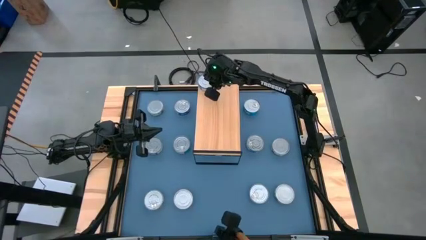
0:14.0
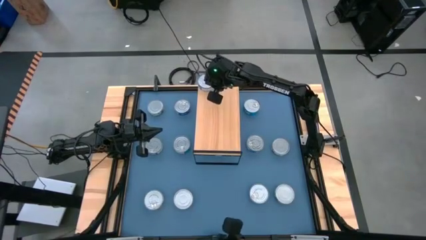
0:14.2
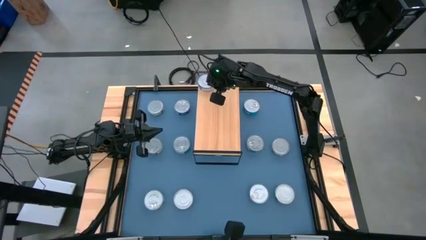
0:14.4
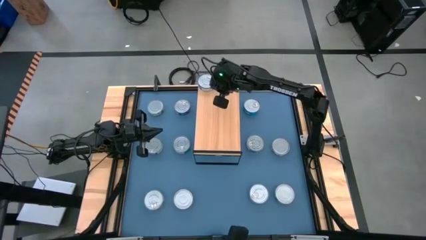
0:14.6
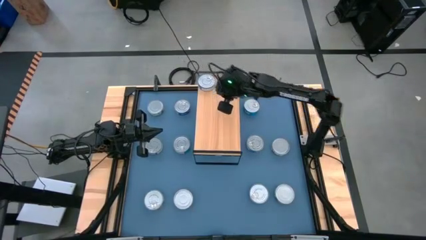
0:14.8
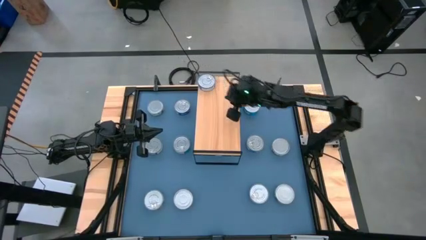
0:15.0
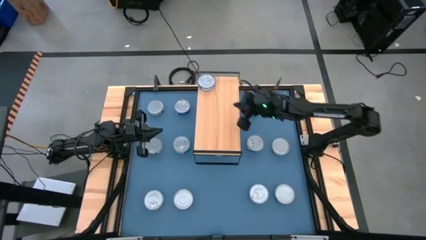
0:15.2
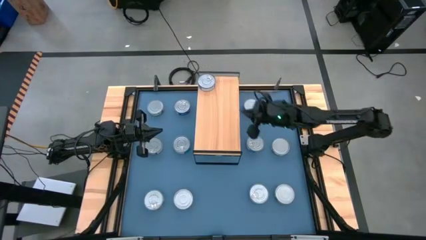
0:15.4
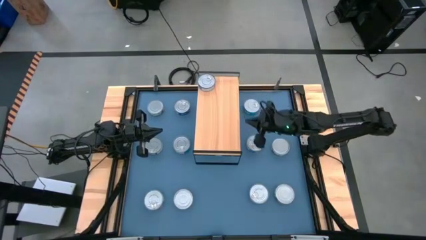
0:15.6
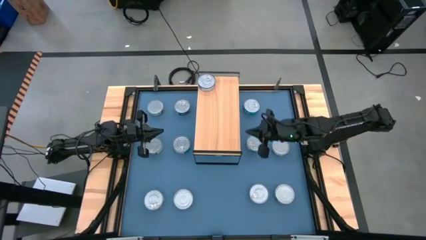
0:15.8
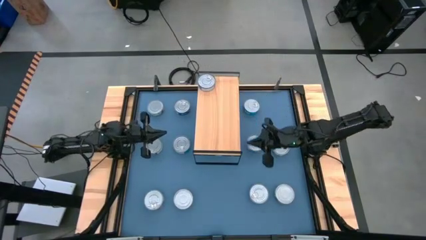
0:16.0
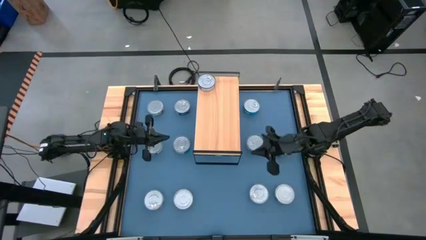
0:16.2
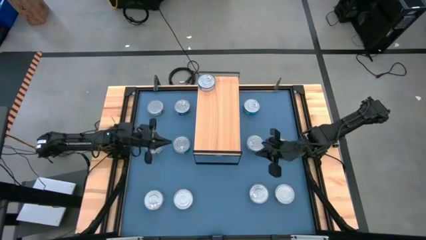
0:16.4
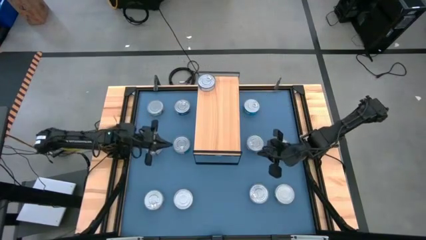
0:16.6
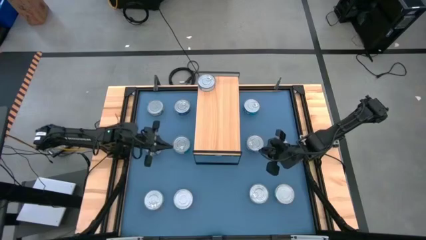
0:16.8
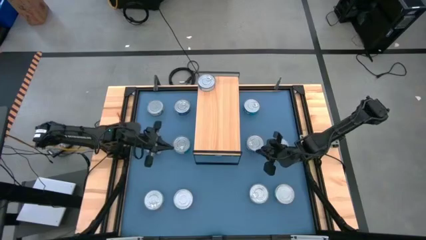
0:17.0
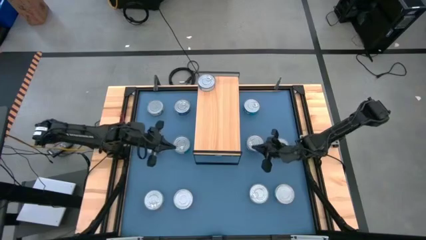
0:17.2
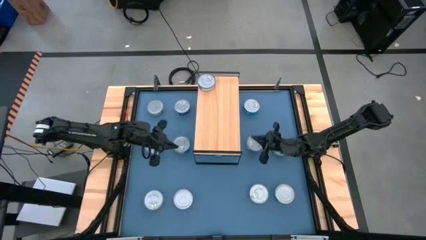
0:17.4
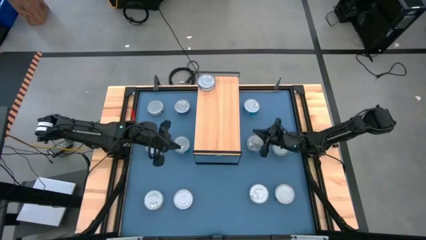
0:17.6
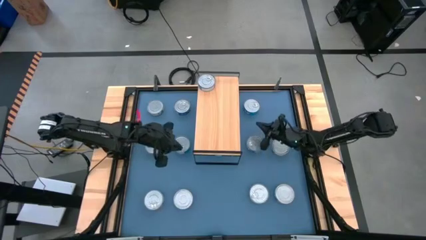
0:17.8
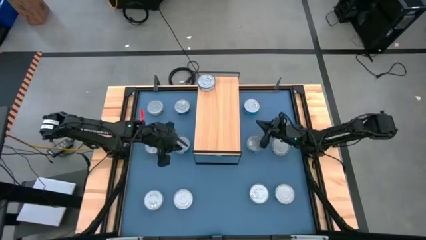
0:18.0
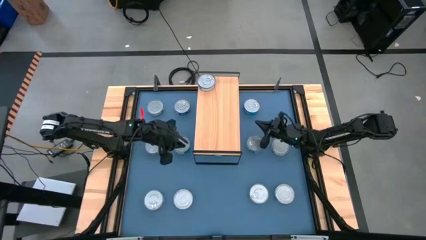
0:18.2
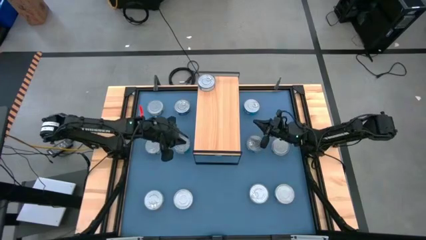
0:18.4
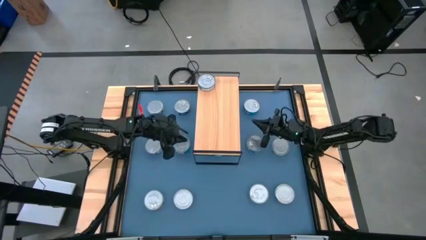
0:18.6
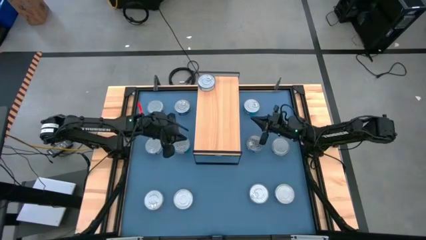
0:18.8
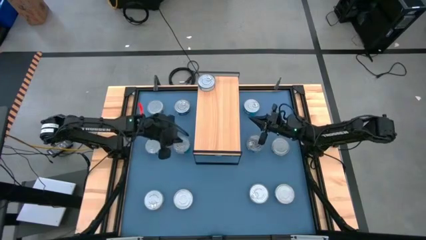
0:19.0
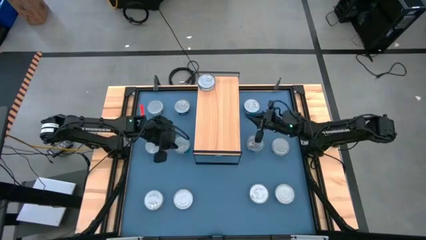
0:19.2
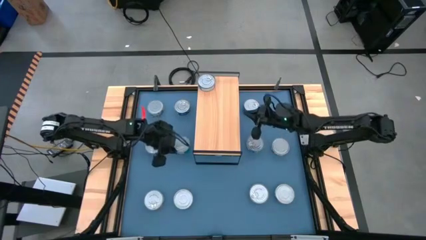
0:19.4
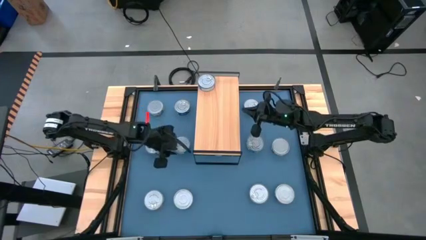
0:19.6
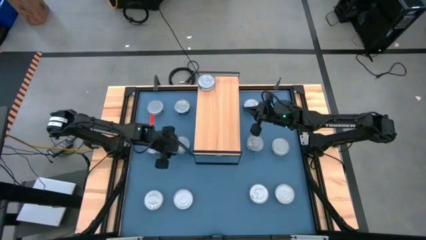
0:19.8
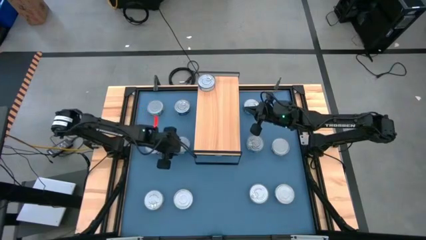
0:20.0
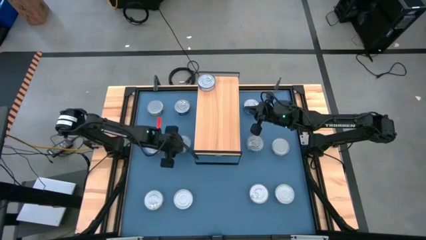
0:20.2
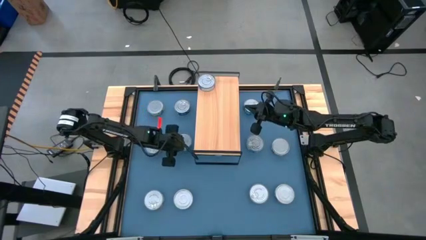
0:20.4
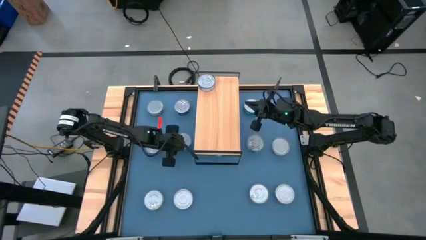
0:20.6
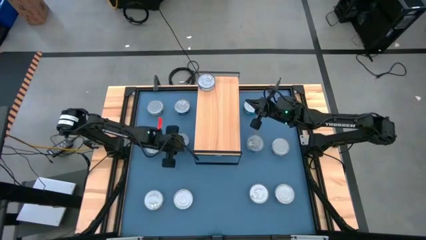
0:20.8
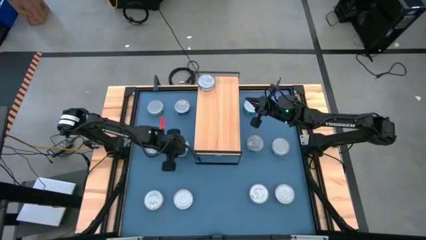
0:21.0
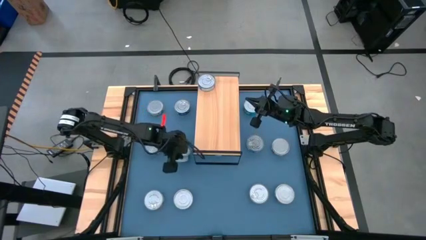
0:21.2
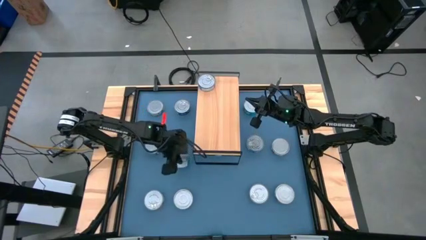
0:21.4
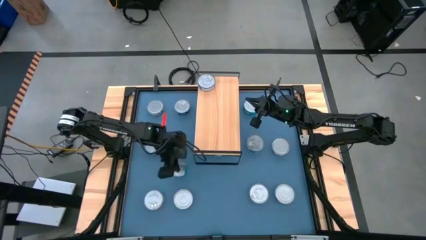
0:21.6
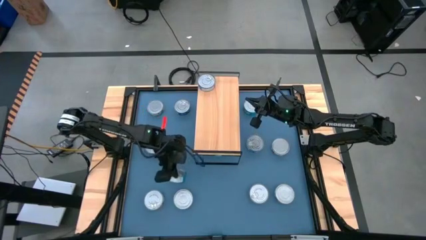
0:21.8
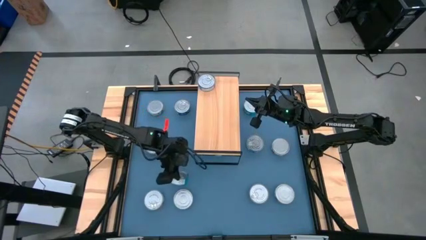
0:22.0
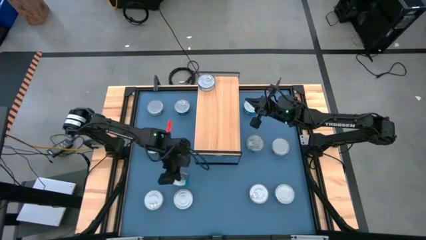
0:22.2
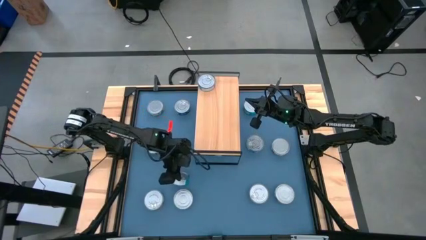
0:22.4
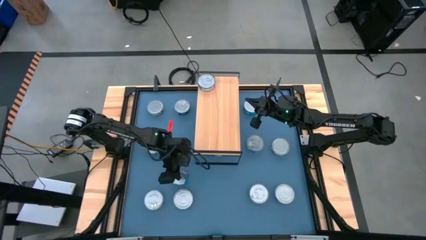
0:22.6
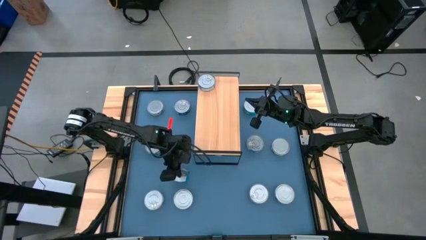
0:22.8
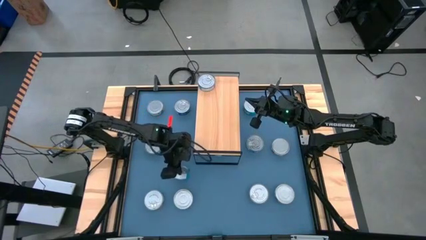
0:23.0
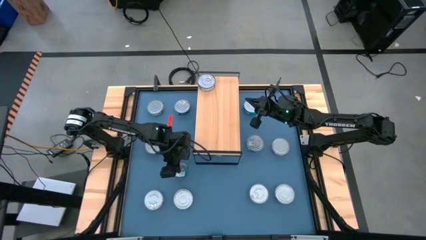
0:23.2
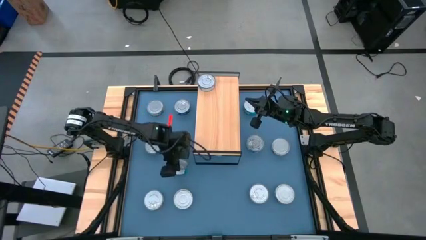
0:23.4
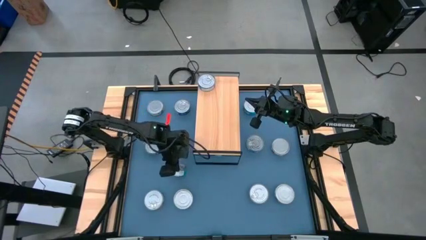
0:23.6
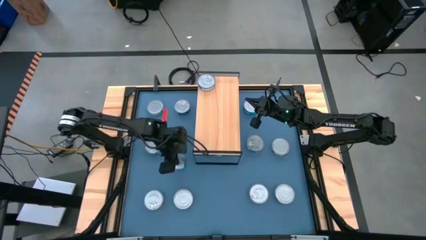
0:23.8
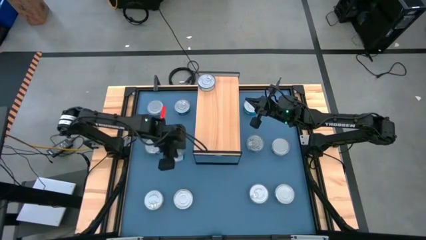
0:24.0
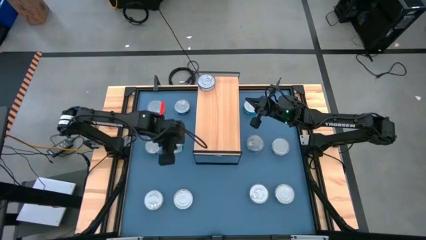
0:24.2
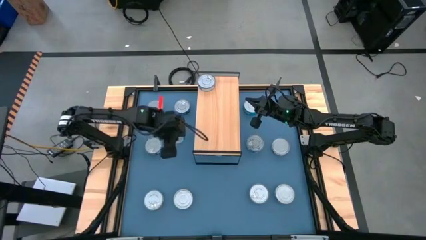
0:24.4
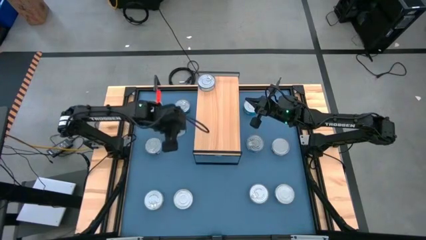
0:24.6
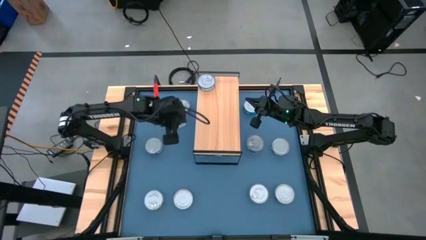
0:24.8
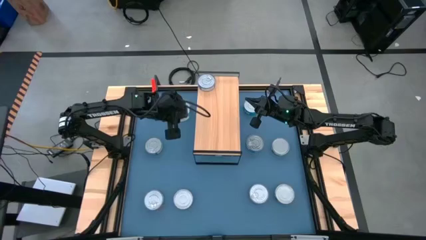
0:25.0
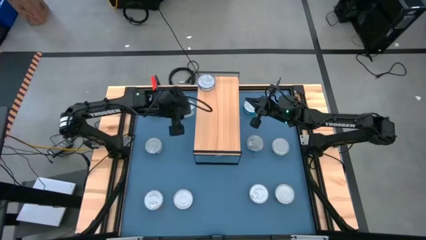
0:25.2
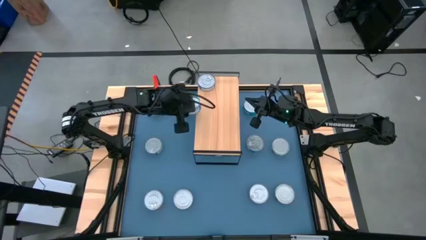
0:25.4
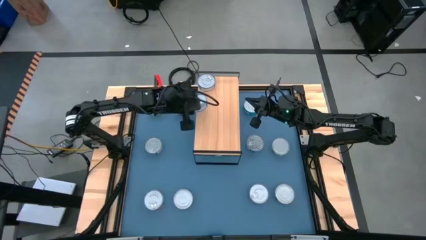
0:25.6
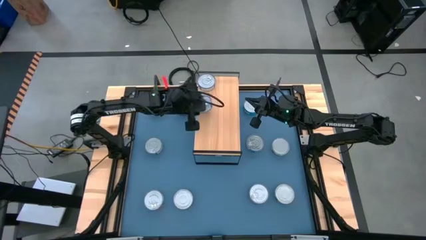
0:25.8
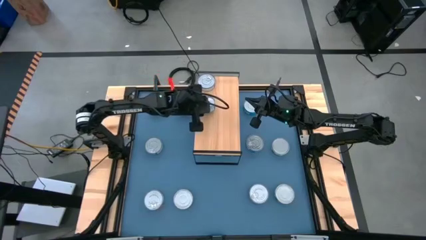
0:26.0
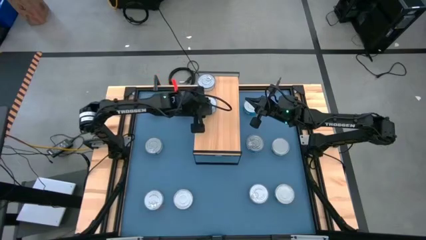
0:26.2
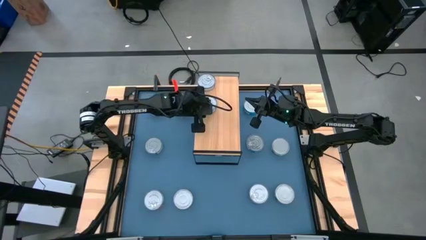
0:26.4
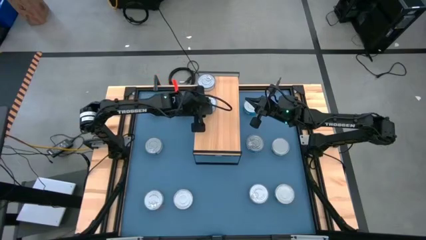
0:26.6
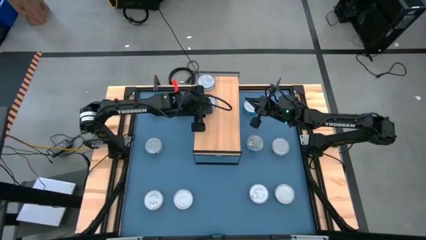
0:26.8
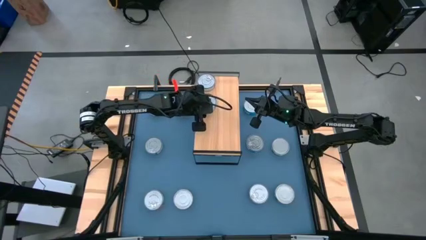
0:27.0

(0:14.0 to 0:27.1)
Task: Stack canned seafood by type on shelf
Put the yellow-blue tuna can on the shelf
